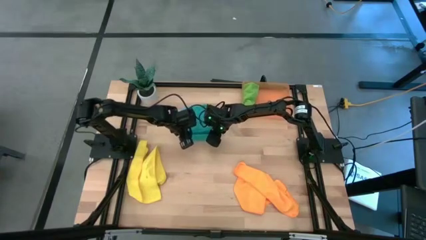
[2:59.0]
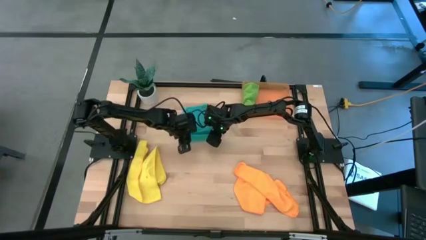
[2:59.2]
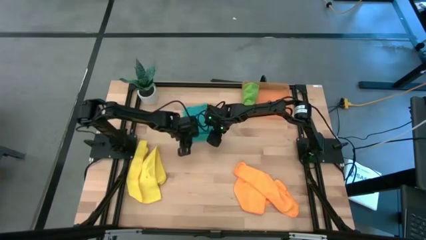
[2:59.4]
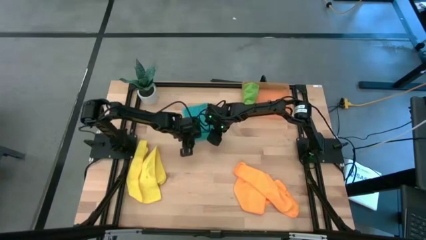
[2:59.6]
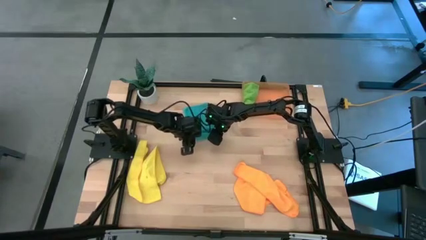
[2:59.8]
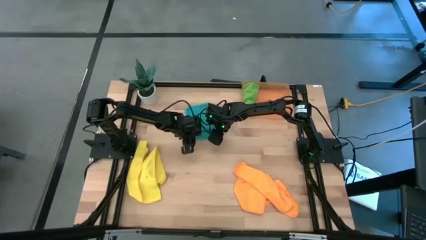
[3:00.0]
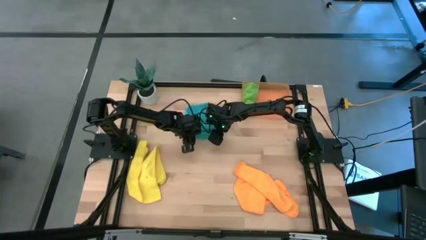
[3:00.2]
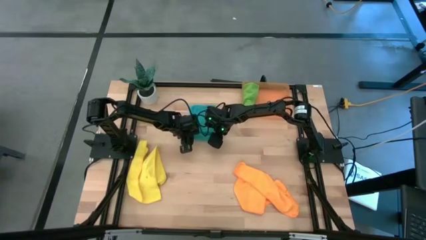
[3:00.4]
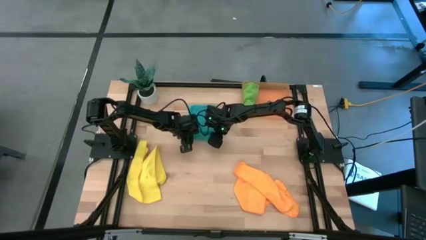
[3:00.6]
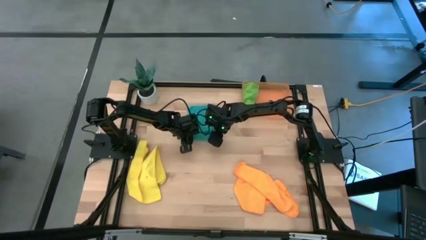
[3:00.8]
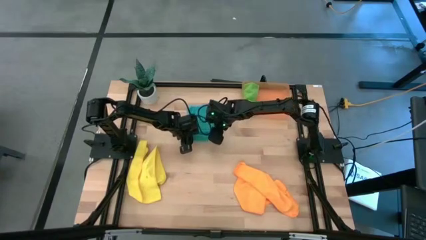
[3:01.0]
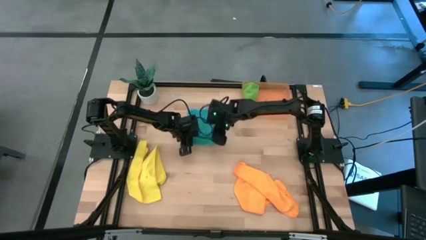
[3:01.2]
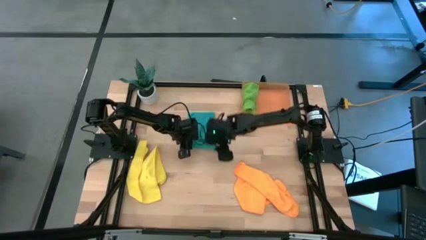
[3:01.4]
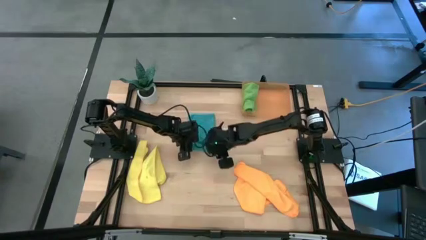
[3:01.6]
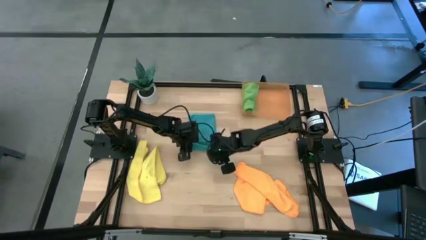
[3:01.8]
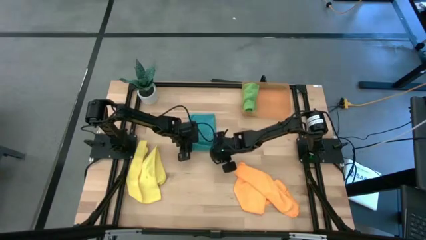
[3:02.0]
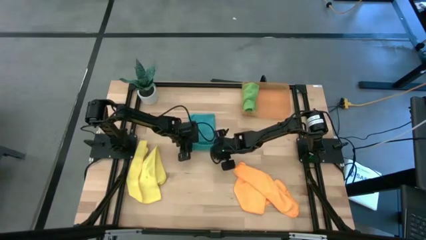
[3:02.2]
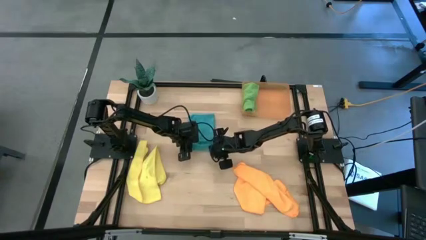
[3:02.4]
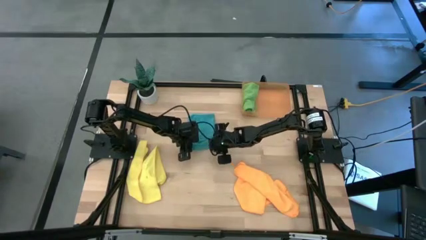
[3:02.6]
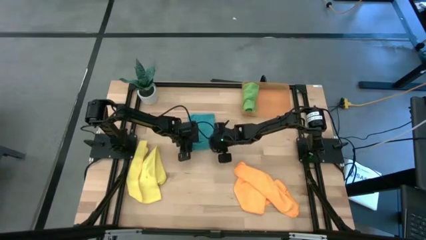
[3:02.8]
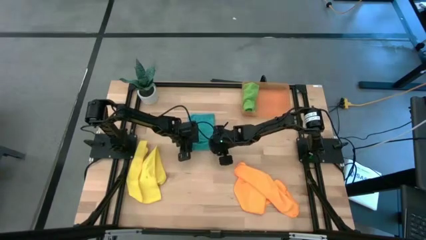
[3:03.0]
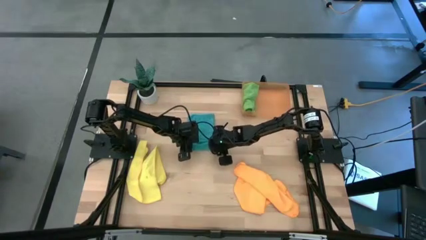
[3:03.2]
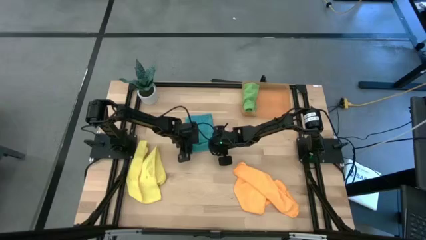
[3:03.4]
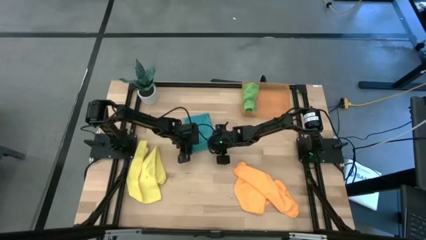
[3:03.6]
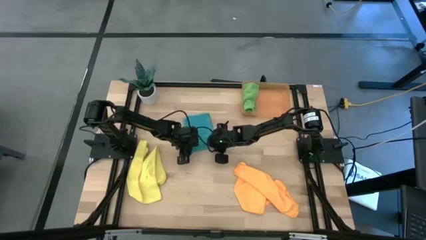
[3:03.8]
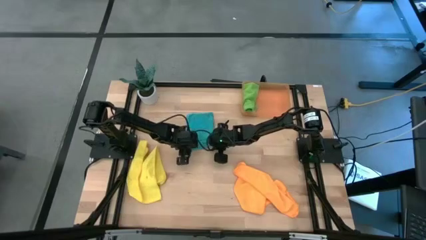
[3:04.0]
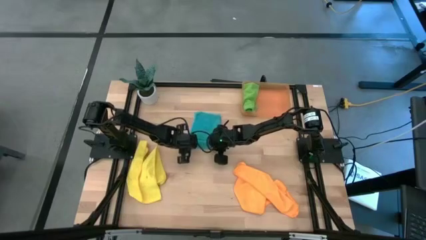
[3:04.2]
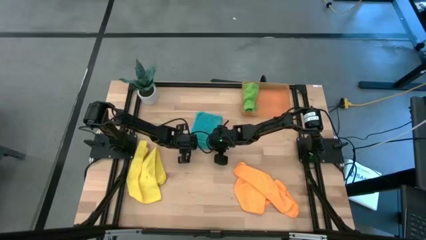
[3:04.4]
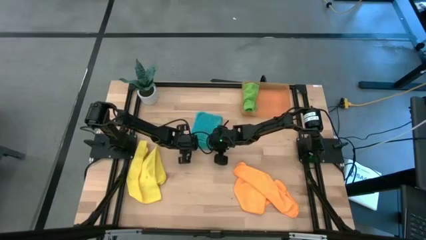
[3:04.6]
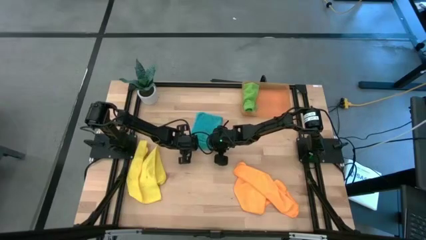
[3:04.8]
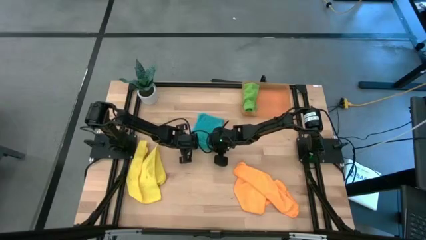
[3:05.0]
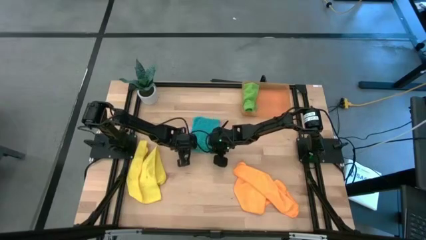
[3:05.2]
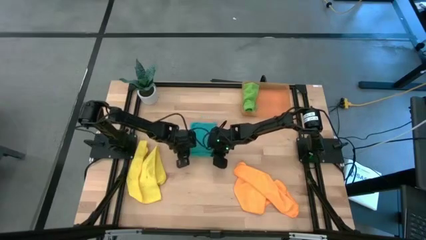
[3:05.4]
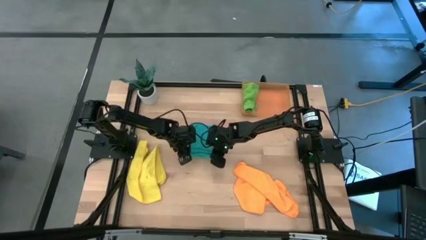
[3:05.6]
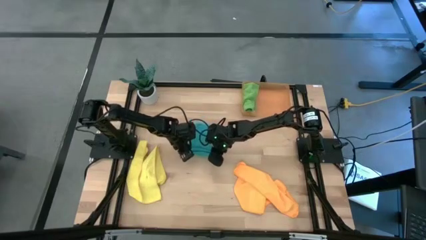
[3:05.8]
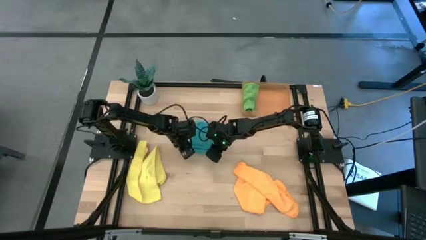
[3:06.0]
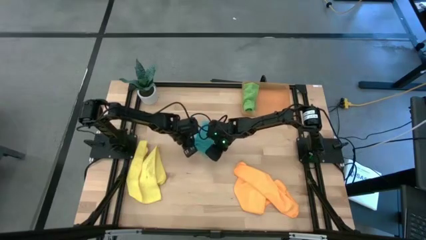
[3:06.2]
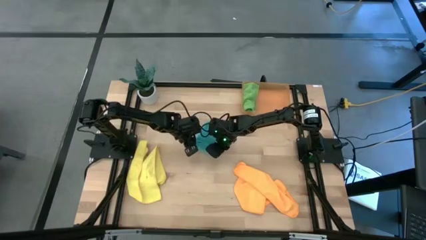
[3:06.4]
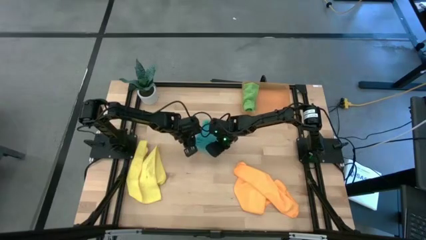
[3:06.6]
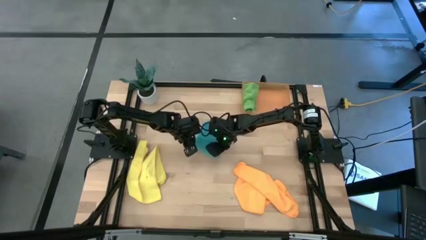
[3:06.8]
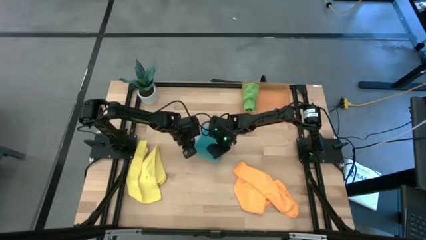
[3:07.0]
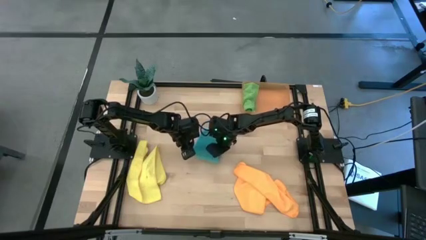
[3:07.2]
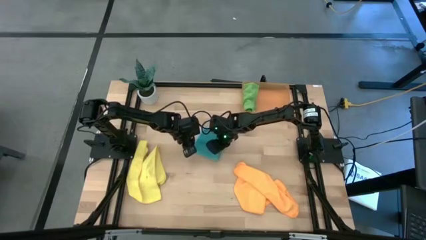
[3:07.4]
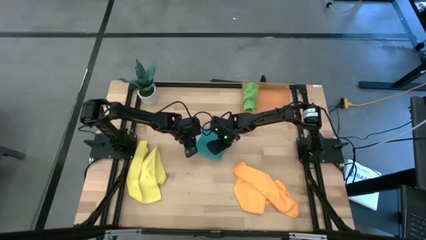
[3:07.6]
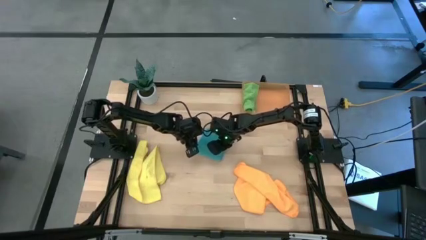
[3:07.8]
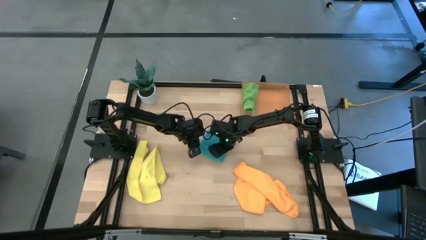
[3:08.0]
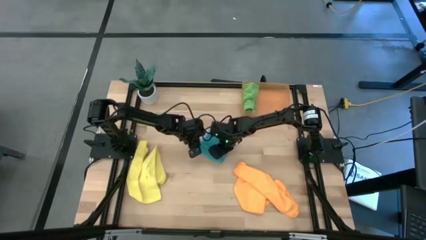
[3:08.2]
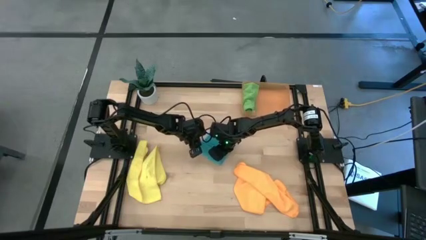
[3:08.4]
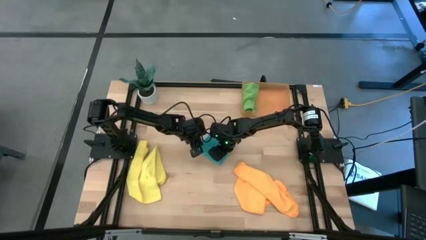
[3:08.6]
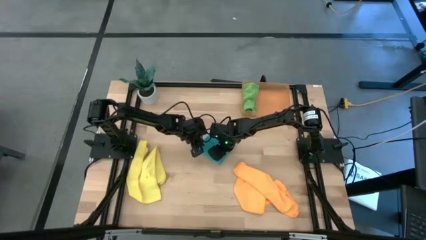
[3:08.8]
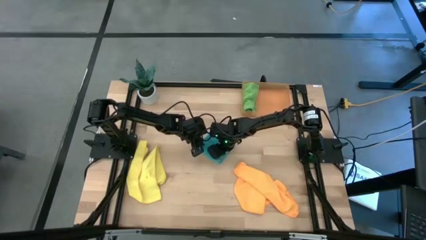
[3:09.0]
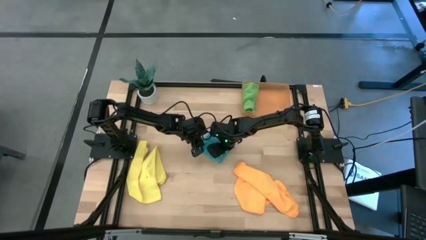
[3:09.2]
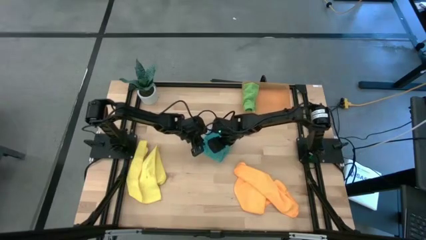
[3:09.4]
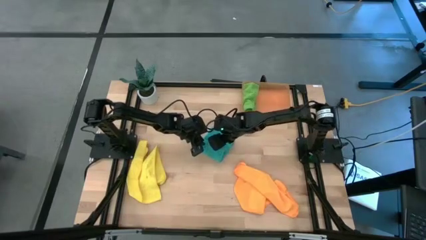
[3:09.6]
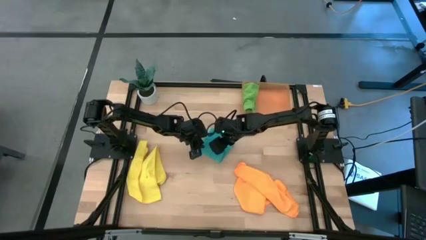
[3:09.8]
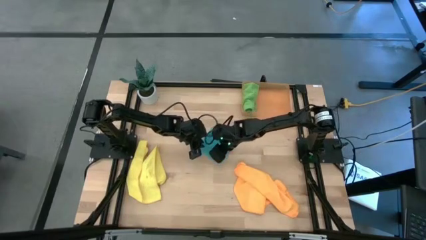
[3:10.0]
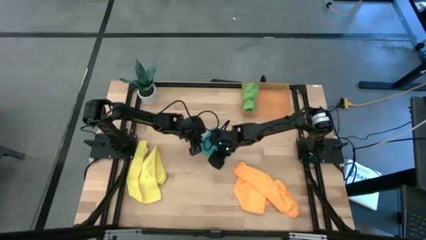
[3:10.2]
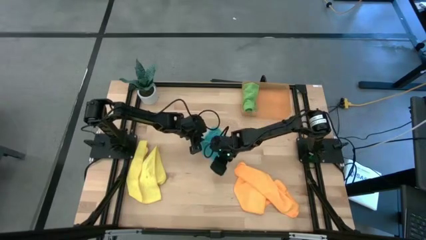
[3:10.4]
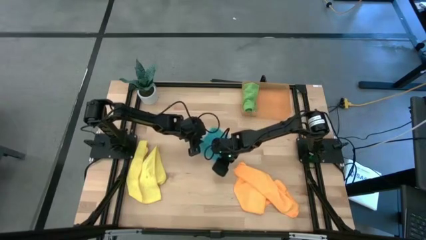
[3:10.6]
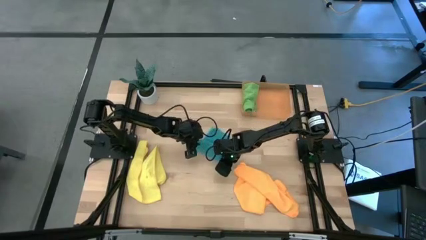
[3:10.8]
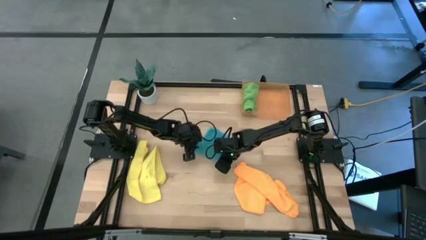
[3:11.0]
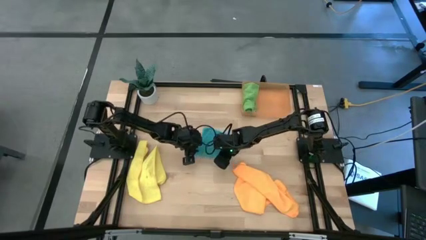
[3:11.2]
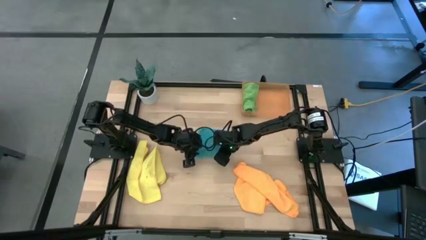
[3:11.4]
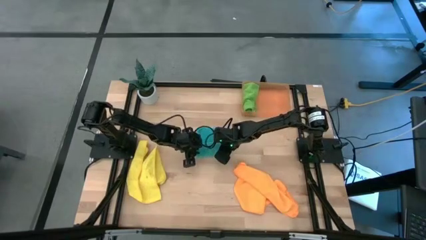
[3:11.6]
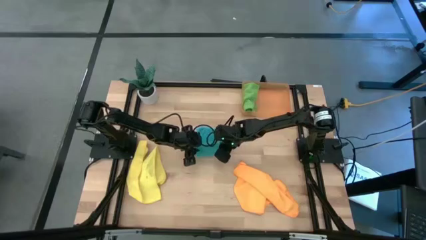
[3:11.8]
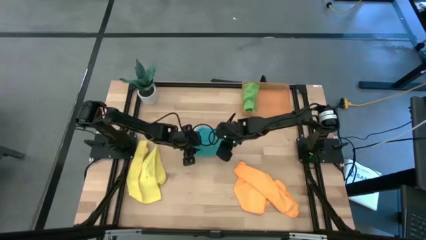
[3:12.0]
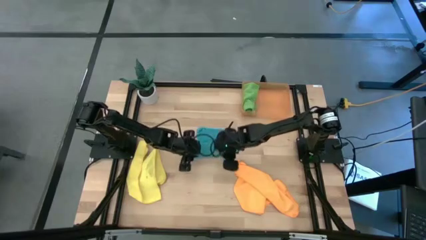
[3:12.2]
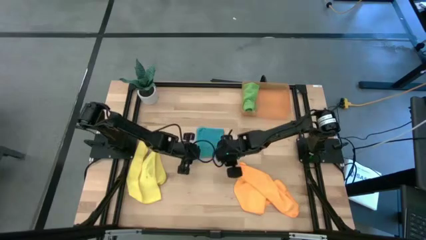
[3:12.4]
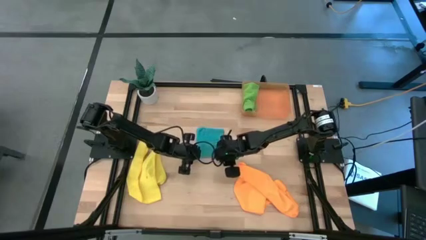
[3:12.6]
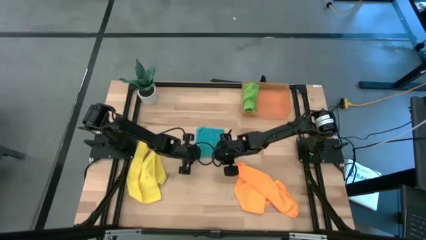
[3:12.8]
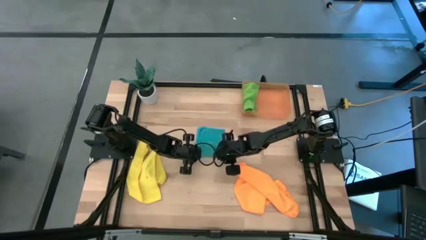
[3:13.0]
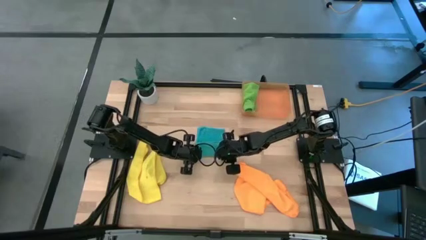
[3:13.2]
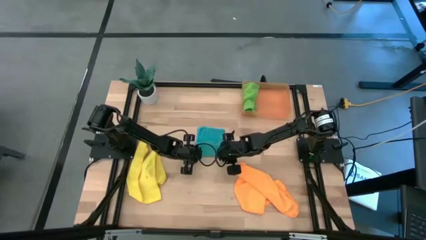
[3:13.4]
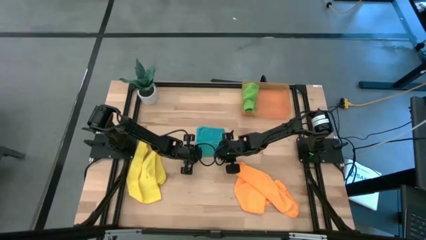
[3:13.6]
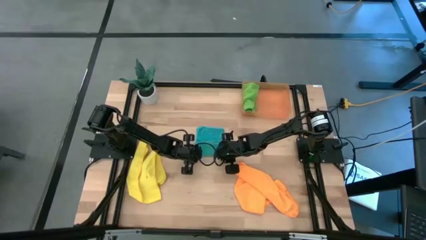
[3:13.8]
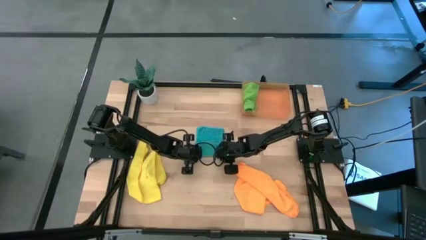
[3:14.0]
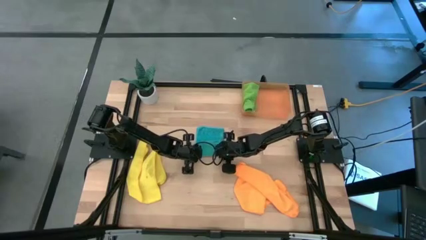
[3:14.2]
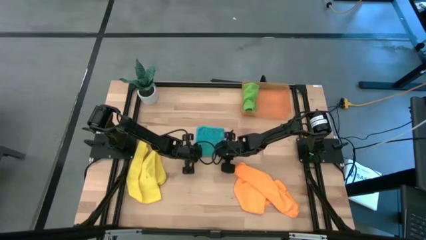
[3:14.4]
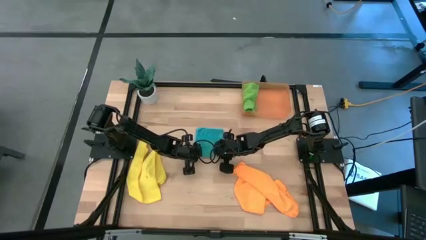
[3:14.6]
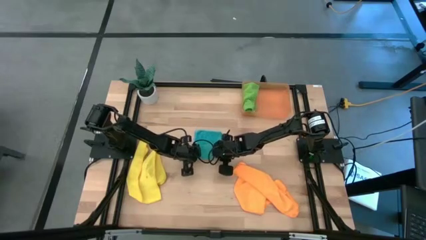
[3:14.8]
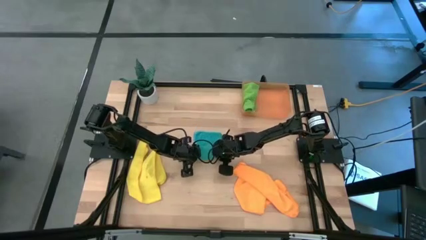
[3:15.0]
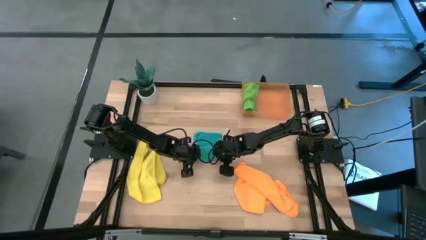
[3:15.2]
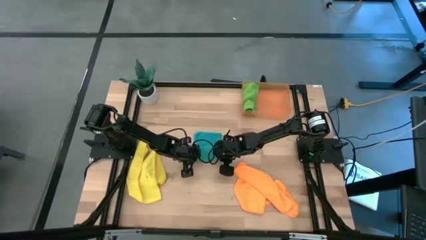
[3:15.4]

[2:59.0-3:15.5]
Task: Roll microfiber towels into tight, uniform cylinder then place into a basket
Fold the blue towel
